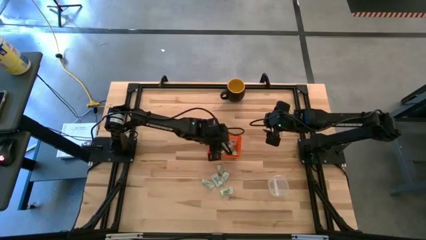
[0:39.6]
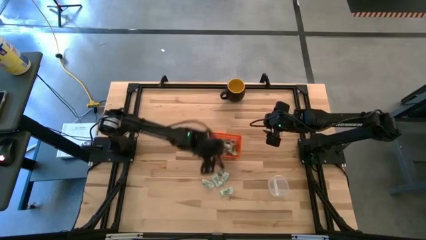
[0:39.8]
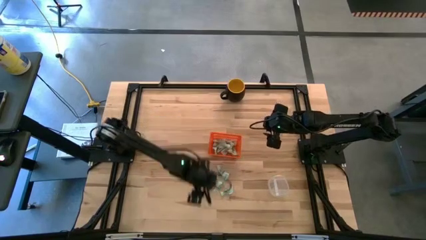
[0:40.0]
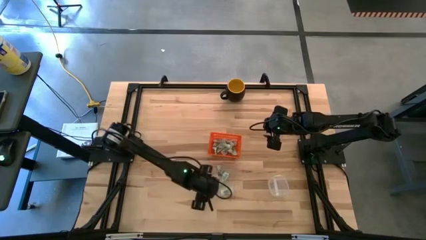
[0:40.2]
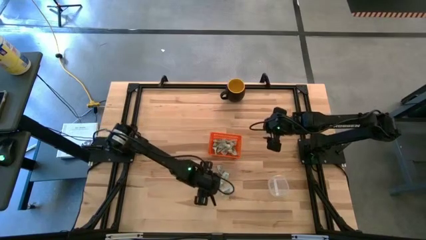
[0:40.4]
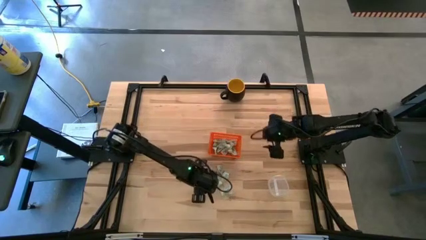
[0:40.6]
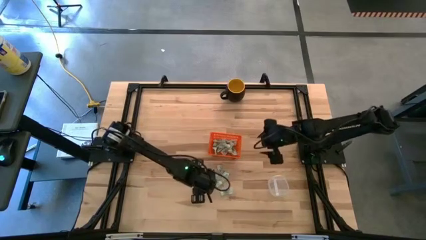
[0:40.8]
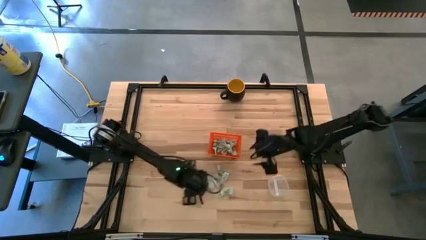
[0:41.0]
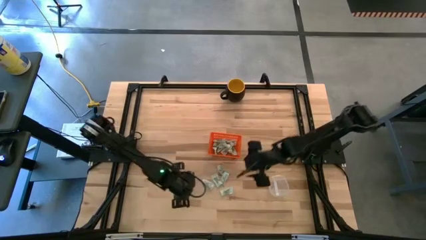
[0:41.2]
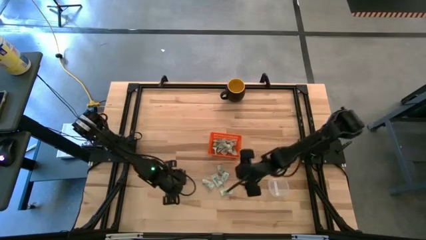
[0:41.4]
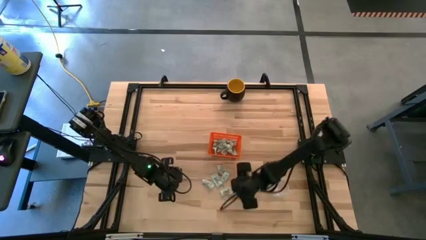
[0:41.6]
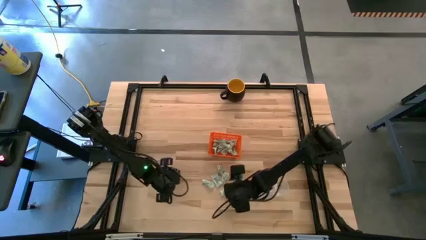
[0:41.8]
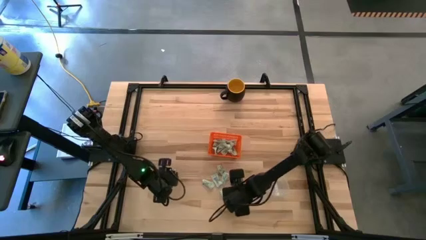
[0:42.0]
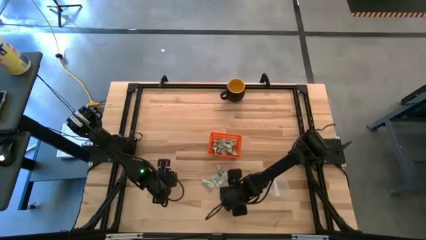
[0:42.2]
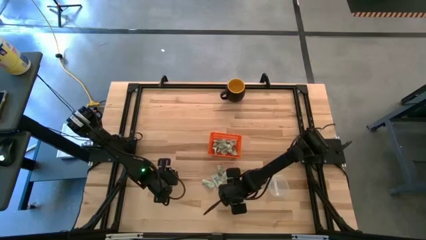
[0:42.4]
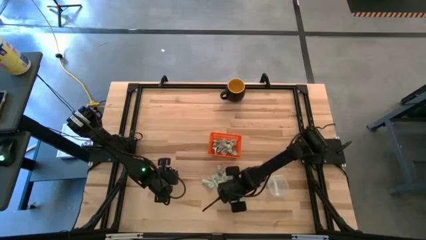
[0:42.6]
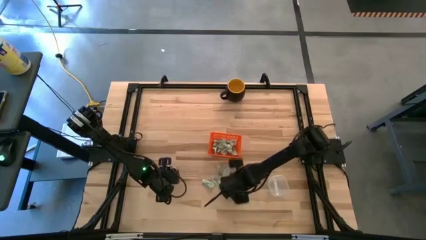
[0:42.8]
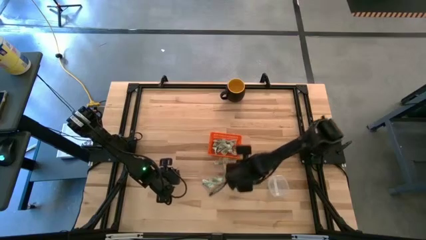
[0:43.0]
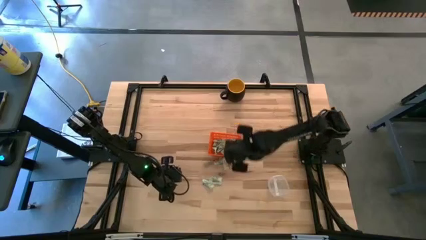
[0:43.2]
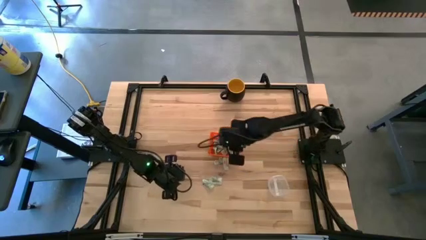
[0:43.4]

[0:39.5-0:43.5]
Task: Pick and place items into bin
Put the light green stevia packet into the orange bin

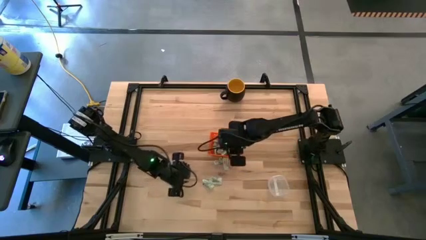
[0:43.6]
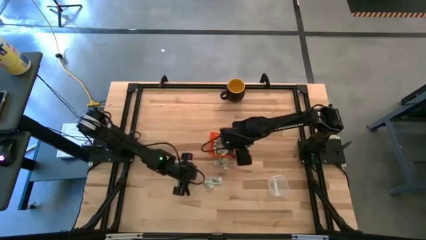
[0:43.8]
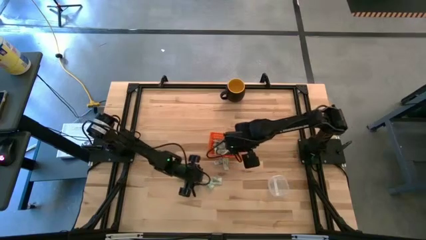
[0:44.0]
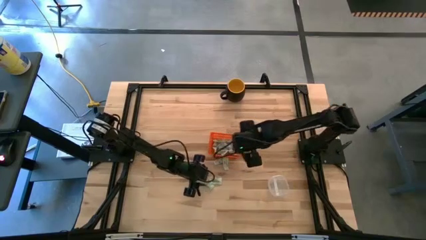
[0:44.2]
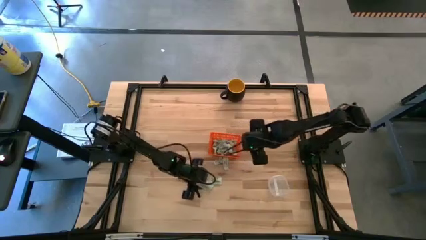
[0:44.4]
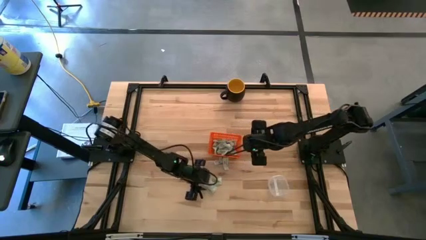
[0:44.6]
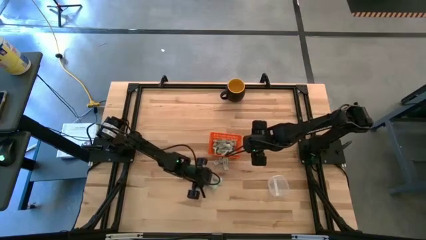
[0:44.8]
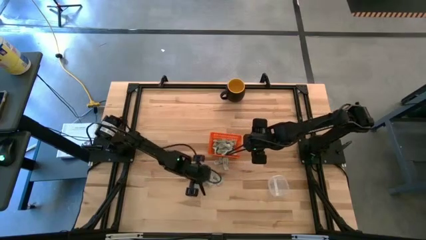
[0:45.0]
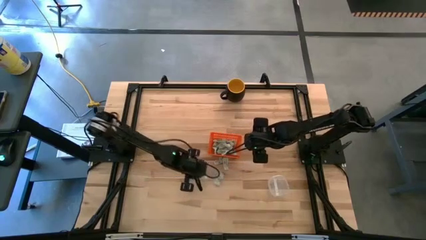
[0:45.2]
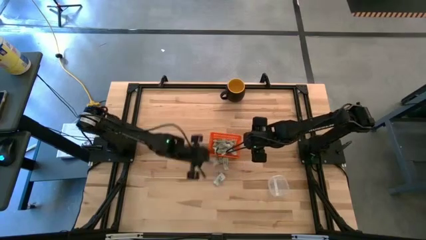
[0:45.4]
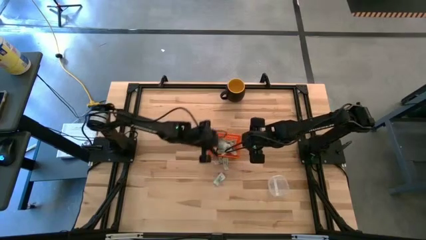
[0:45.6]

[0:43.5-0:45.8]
Put the light green stevia packet into the orange bin

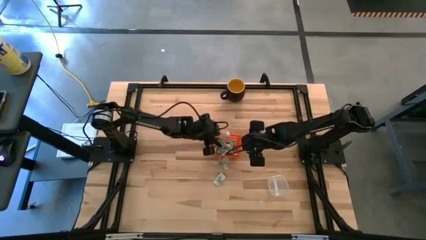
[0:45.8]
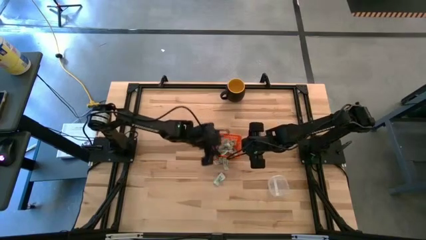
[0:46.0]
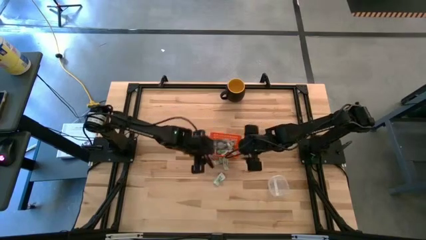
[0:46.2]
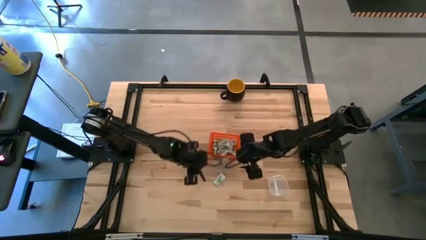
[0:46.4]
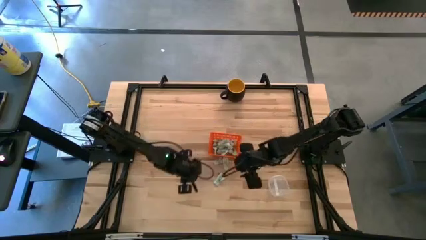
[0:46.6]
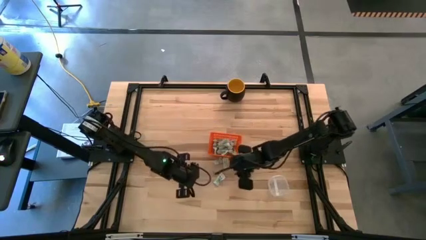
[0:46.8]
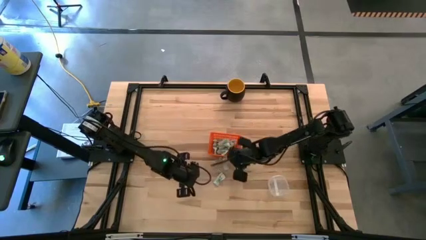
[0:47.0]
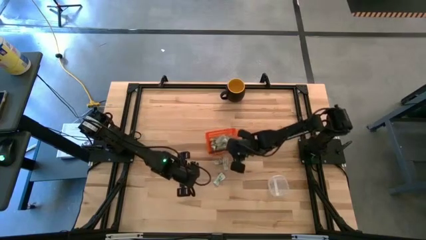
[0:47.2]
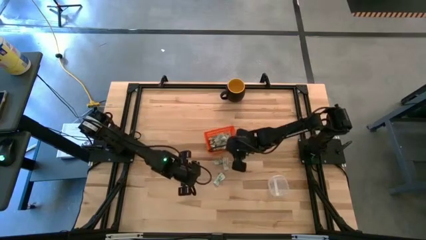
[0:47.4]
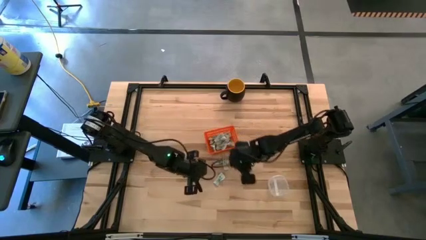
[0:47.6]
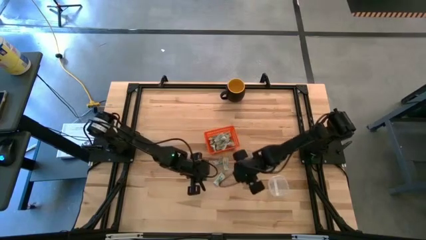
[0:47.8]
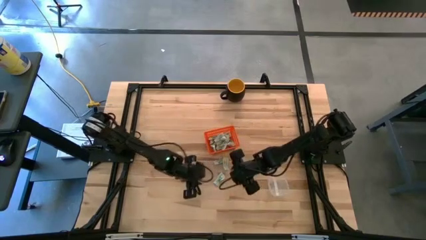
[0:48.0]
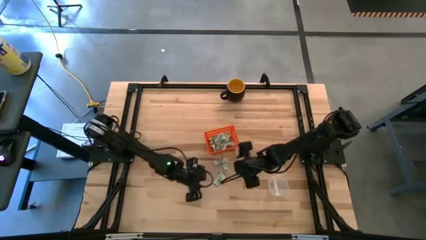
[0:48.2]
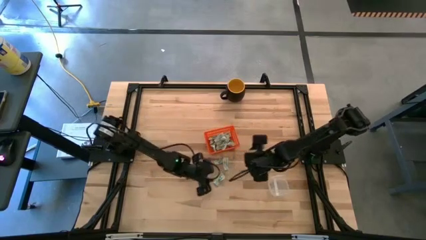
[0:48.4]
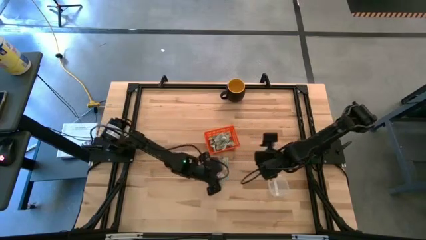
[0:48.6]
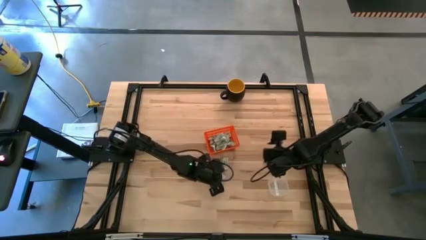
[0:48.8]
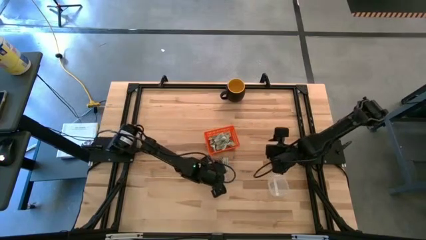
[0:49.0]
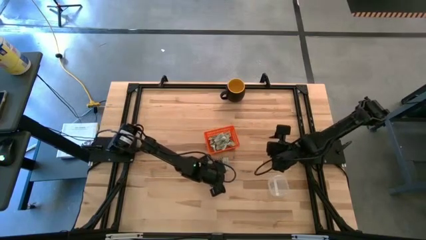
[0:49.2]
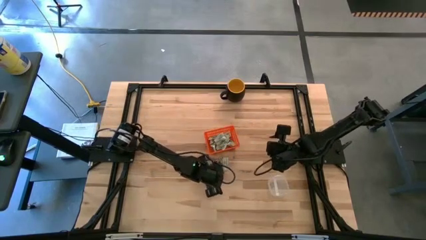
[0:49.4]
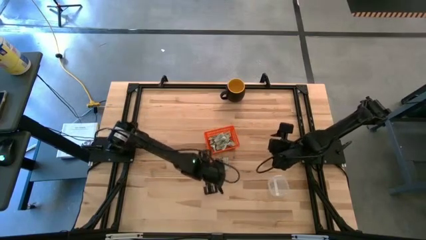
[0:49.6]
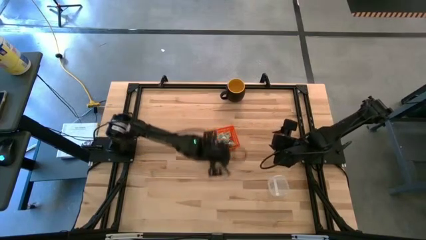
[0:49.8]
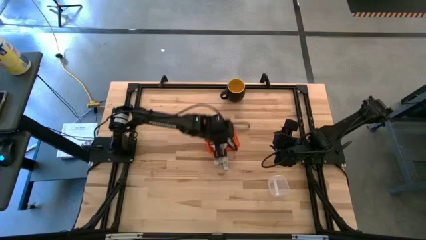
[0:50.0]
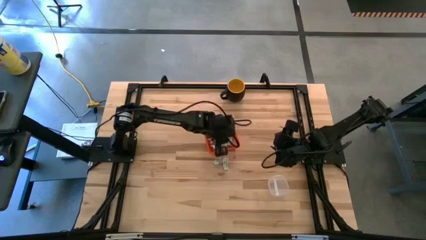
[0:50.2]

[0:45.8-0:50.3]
Put the light green stevia packet into the orange bin

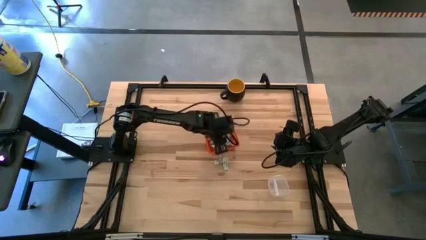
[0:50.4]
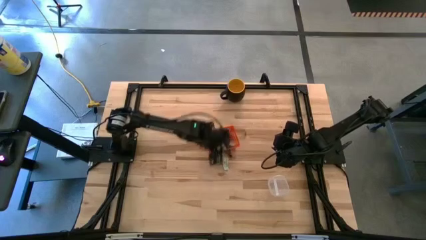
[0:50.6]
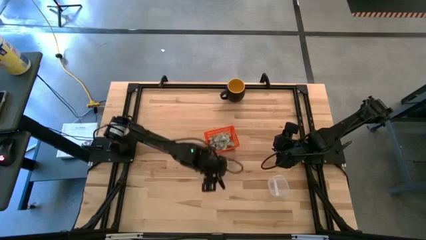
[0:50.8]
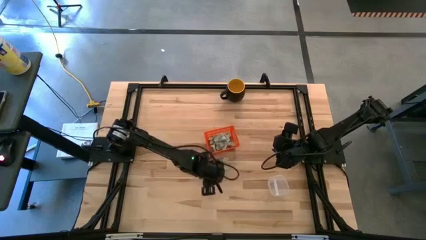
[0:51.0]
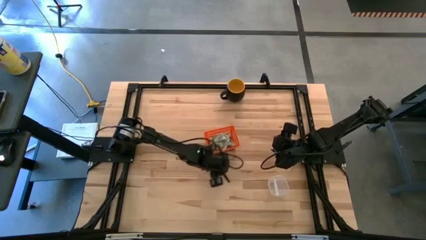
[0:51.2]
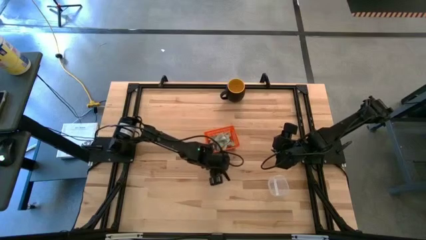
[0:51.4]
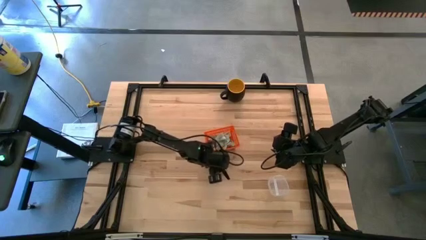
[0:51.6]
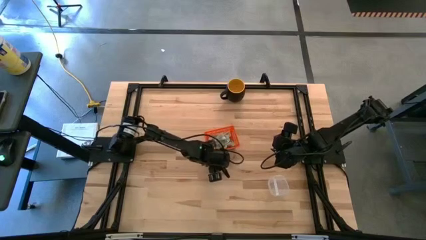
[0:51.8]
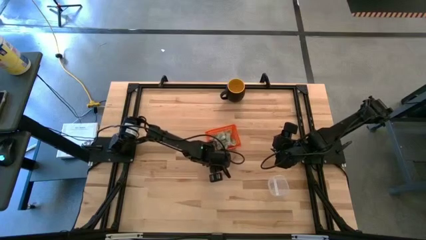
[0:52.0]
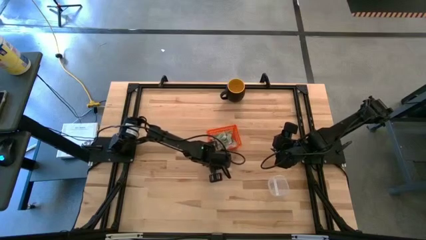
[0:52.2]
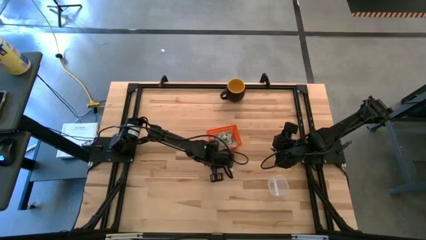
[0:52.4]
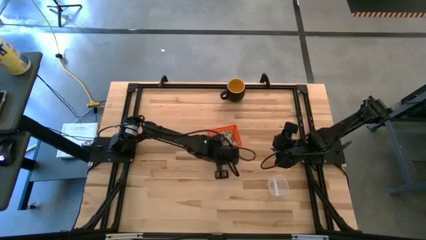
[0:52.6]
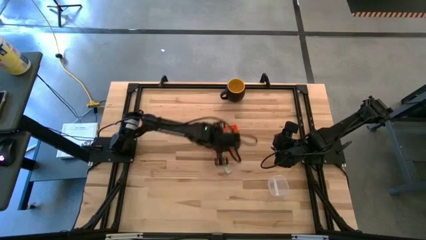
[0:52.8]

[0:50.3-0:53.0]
Put the light green stevia packet into the orange bin

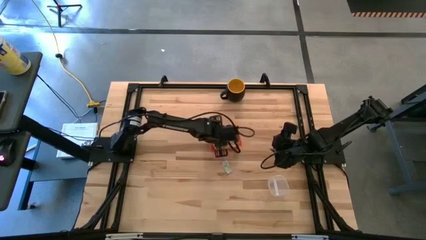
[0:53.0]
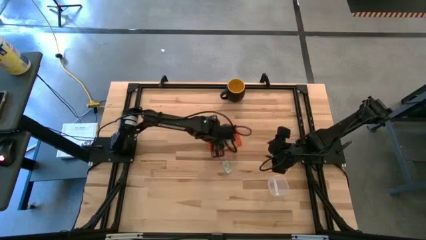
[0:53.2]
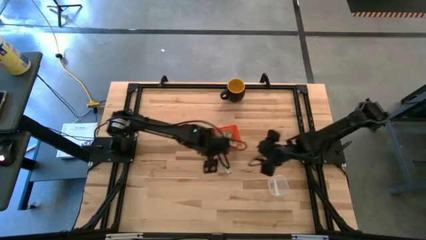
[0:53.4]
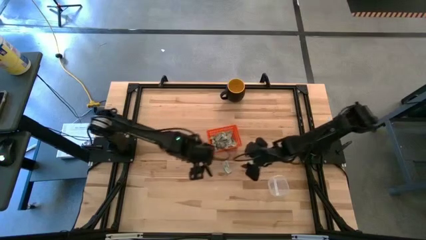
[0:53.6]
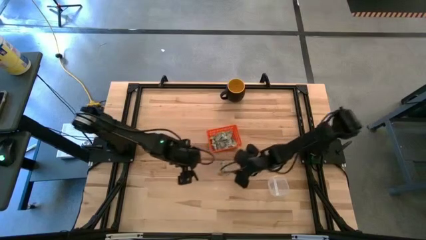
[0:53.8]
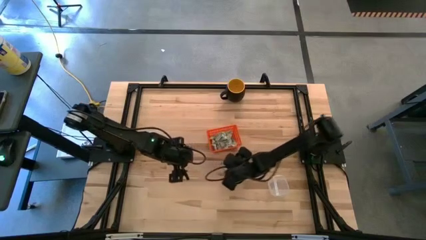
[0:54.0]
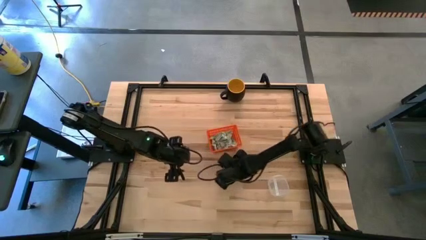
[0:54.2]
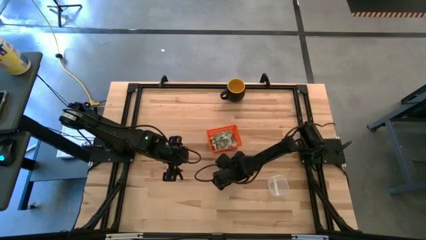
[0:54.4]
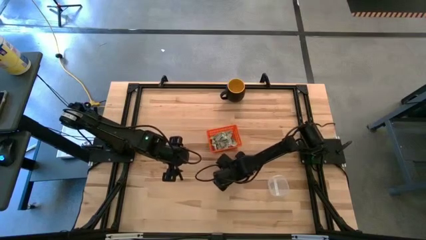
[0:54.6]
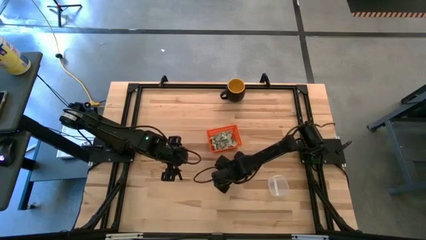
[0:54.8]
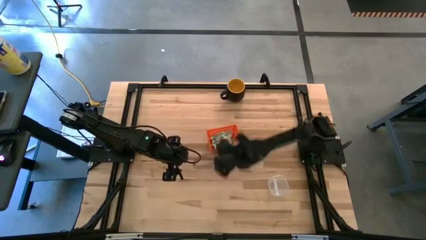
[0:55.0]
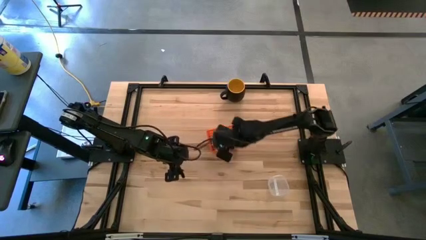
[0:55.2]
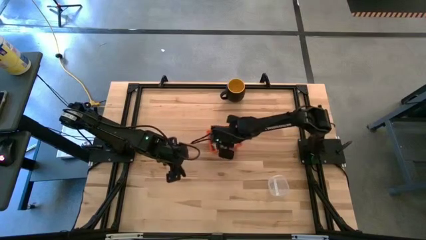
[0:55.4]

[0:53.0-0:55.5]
Put the light green stevia packet into the orange bin
